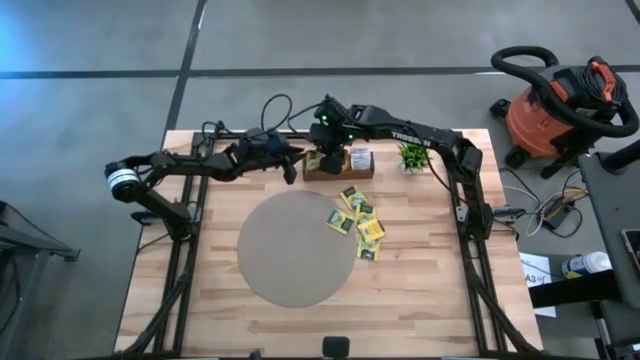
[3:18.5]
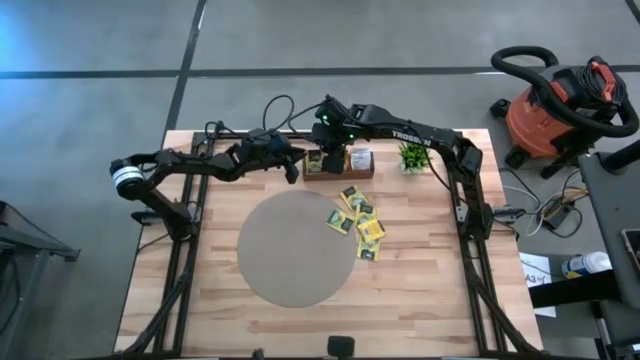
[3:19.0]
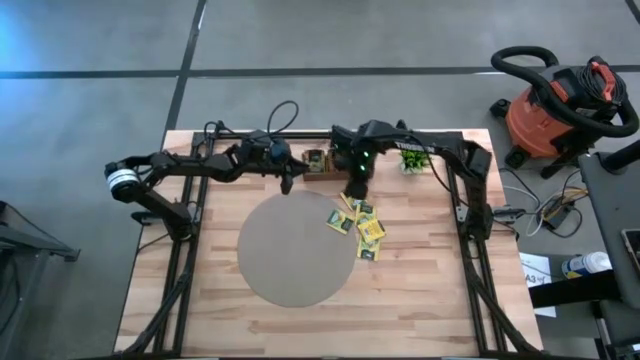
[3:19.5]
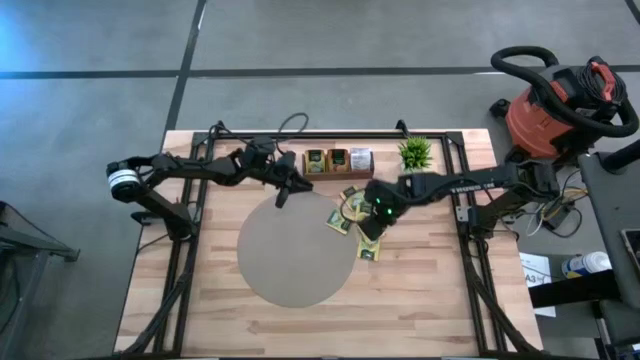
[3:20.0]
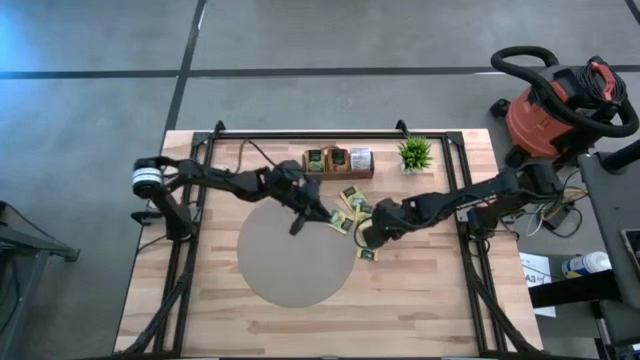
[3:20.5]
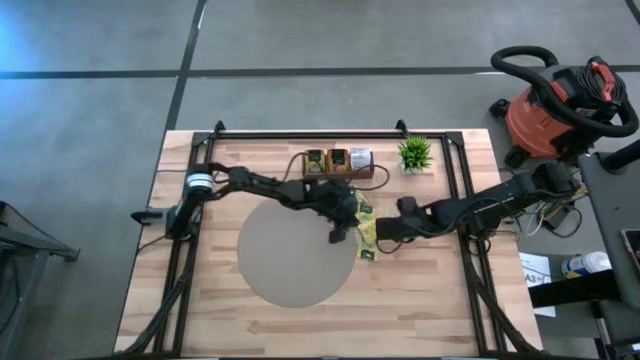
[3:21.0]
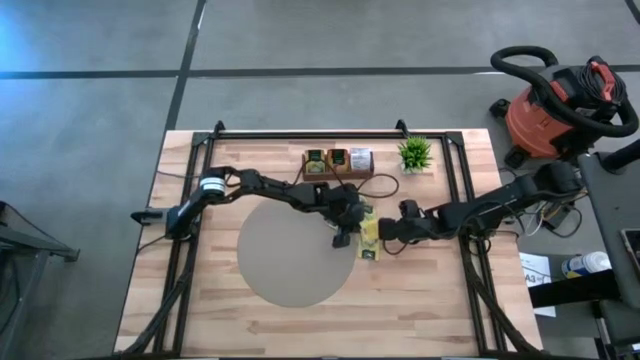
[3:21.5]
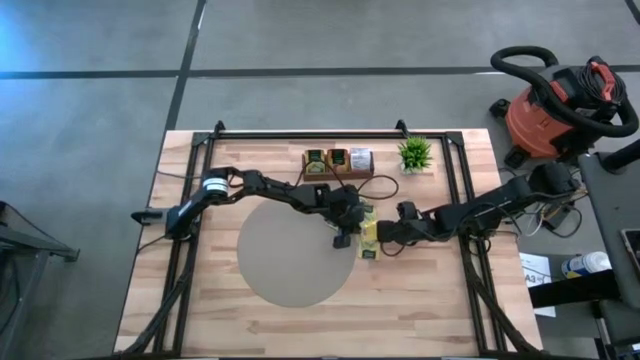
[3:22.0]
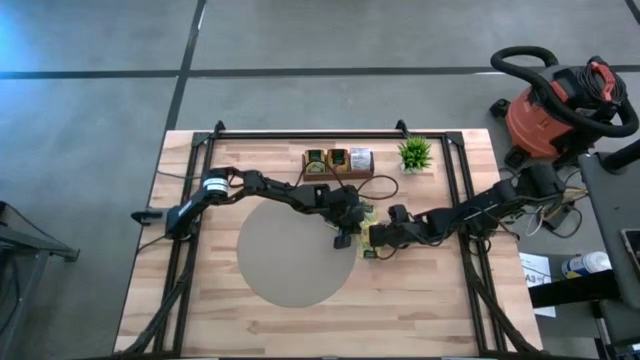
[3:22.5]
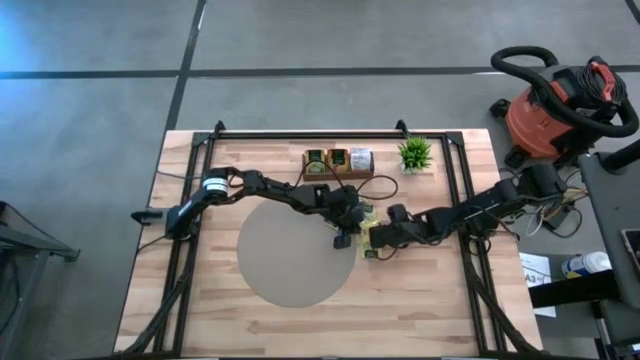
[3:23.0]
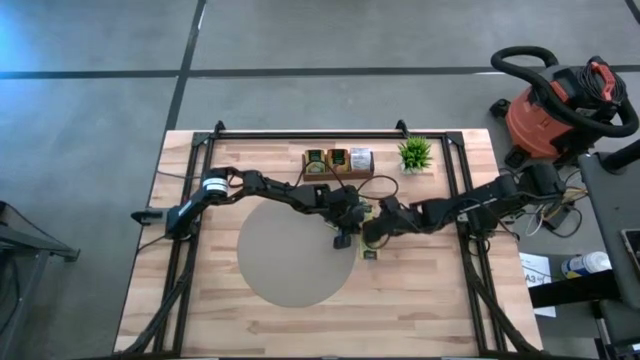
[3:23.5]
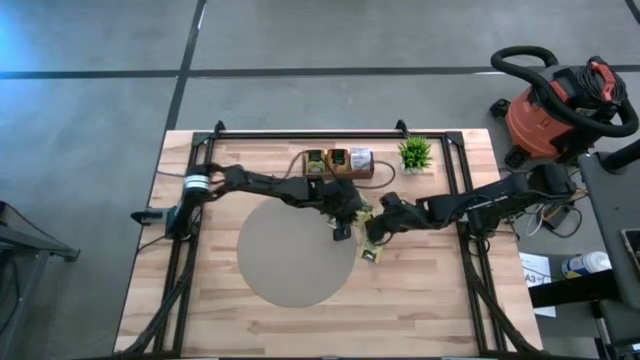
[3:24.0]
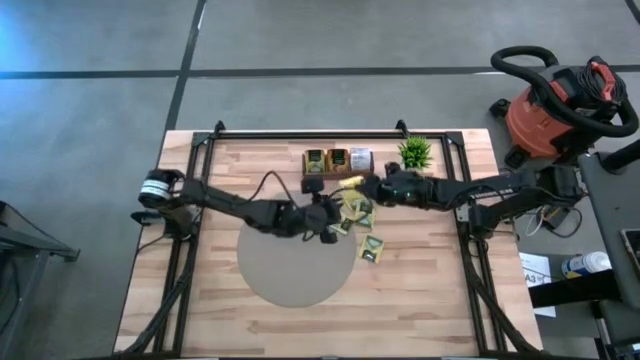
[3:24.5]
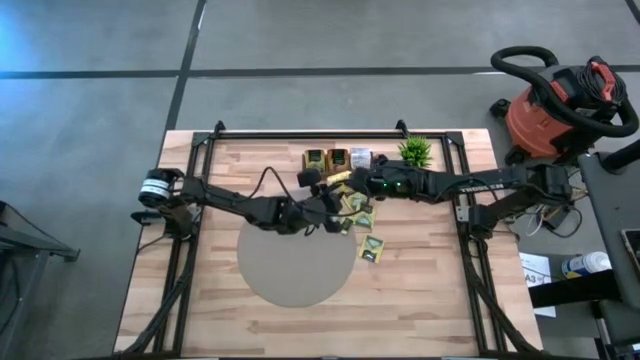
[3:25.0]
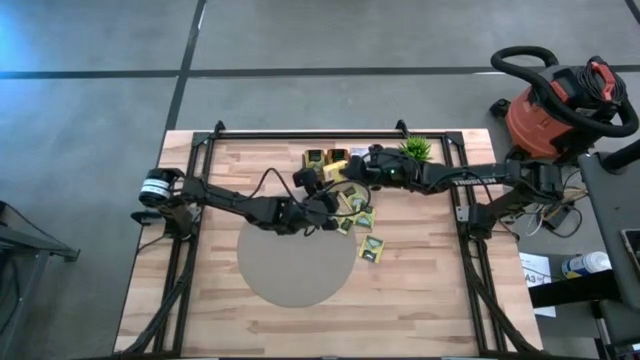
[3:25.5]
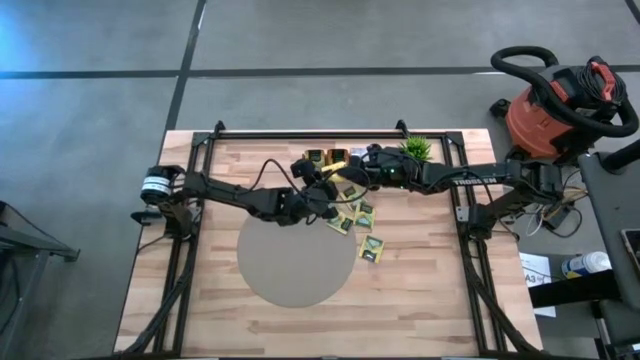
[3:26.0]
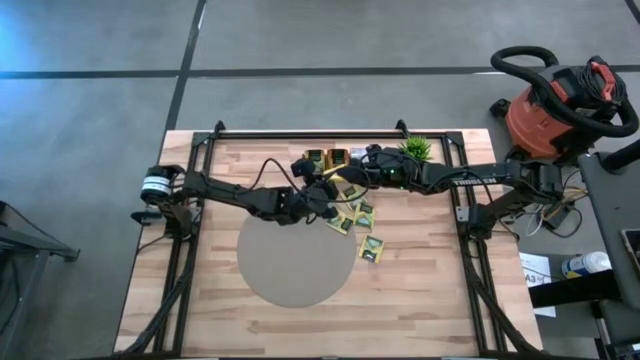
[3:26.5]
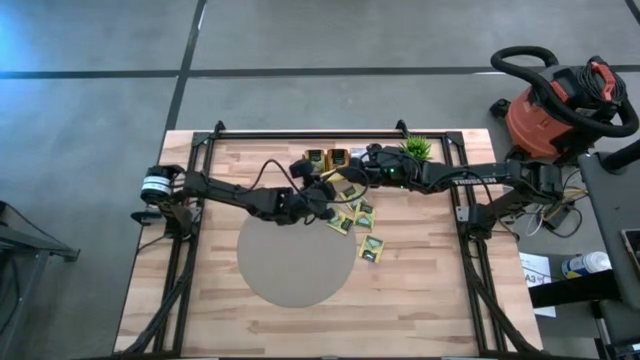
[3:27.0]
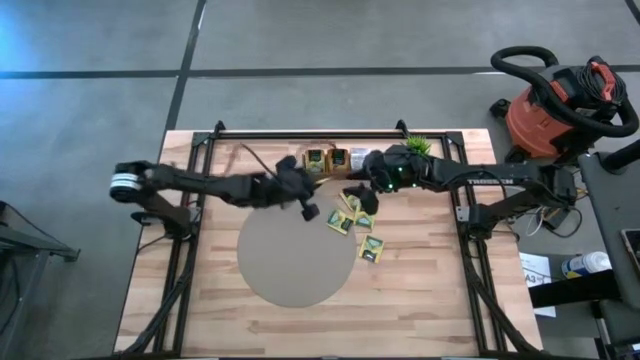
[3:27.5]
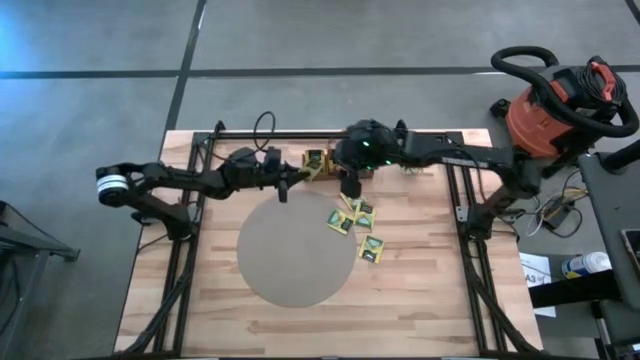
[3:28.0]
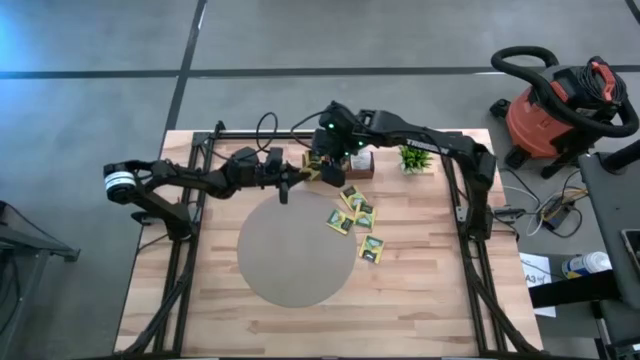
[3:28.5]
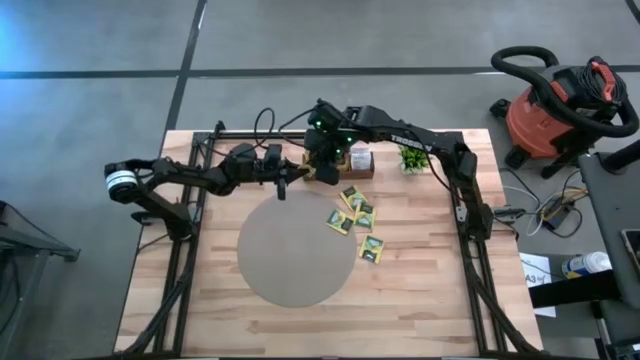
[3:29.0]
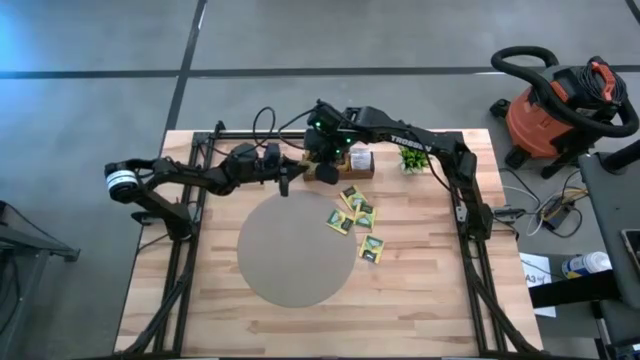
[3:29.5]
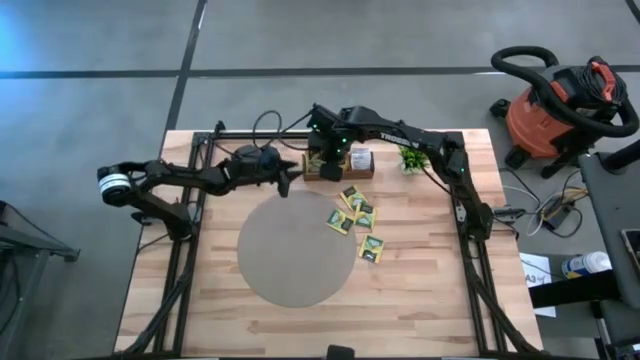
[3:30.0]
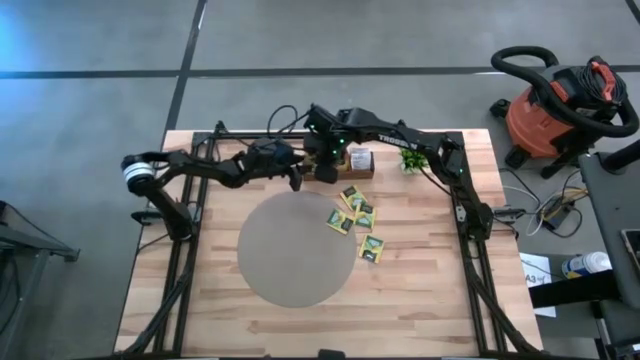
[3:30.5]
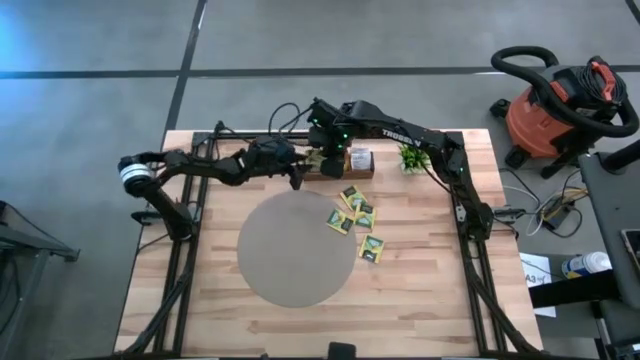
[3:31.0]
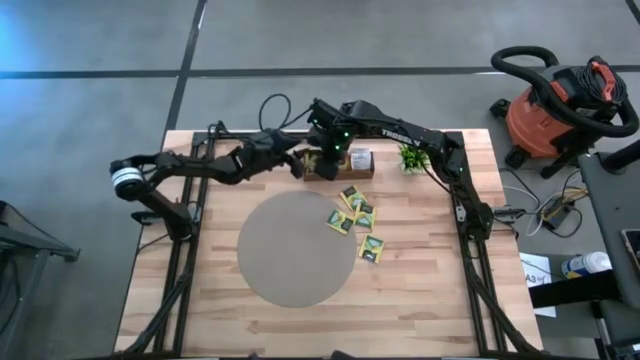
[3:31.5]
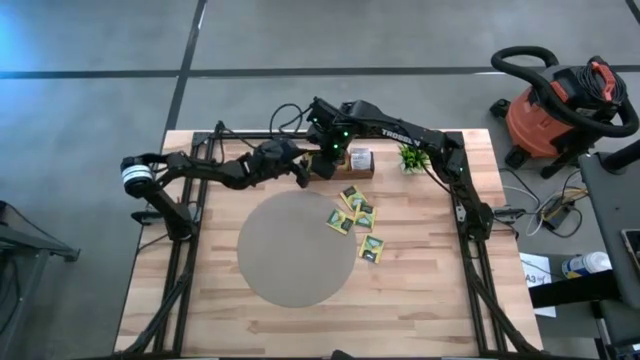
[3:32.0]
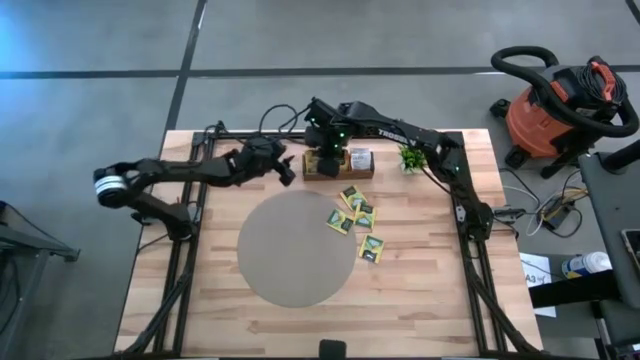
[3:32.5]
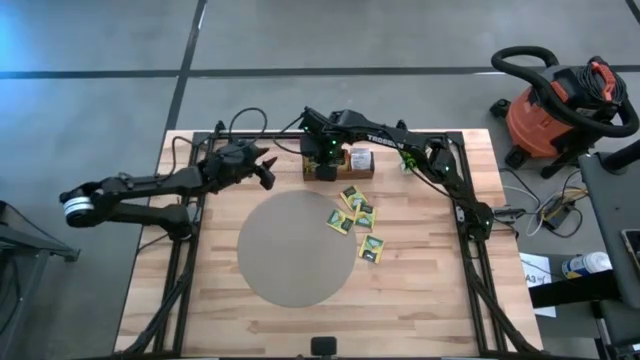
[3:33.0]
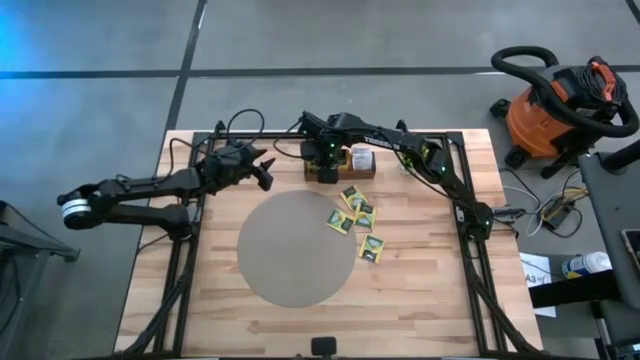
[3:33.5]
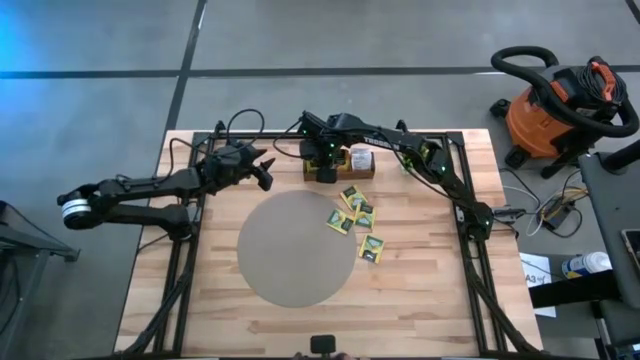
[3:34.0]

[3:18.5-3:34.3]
Task: Pick & Place Tea
Put the yellow tea sachet into the left compartment of the wooden organizer

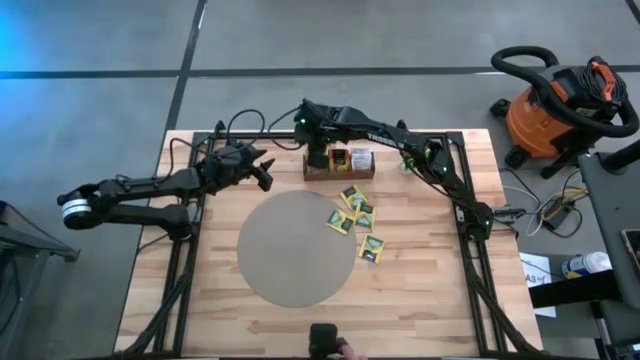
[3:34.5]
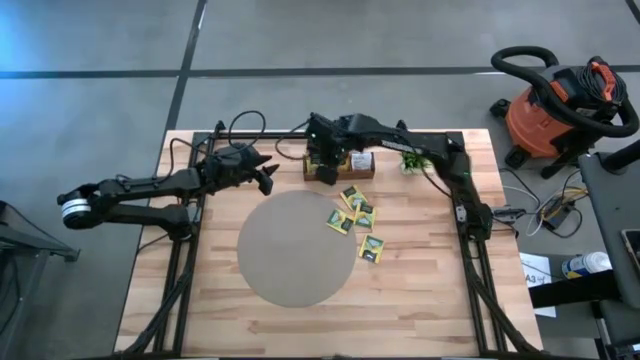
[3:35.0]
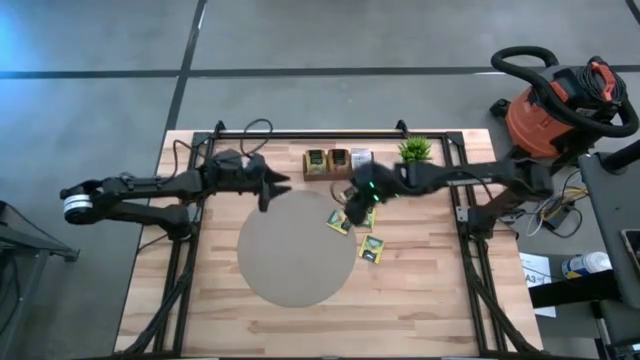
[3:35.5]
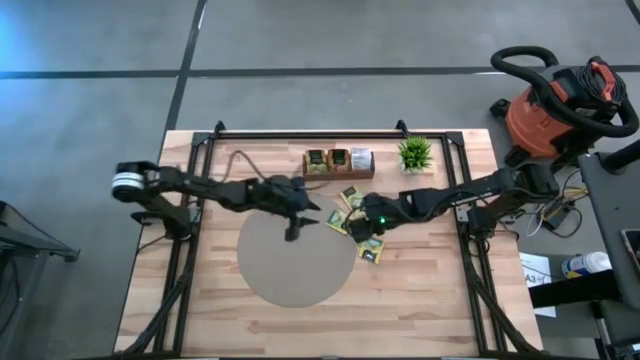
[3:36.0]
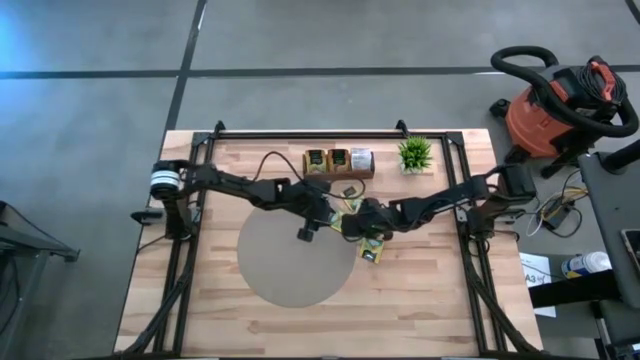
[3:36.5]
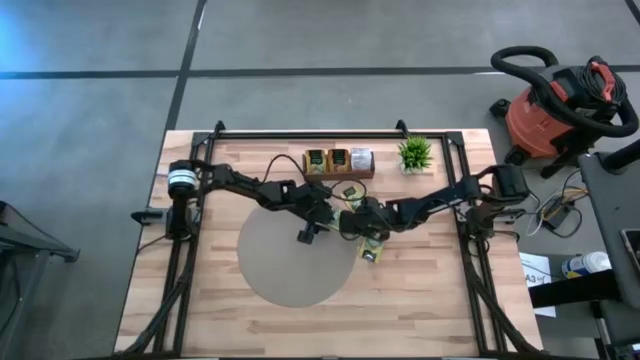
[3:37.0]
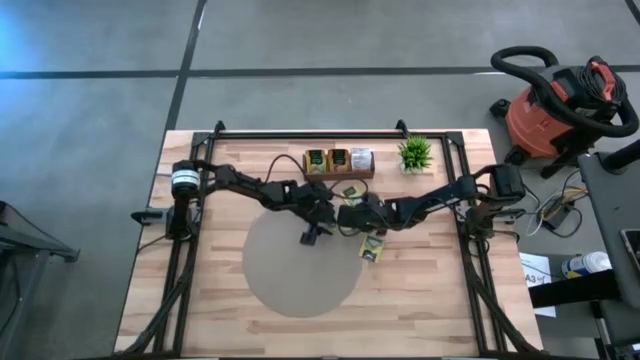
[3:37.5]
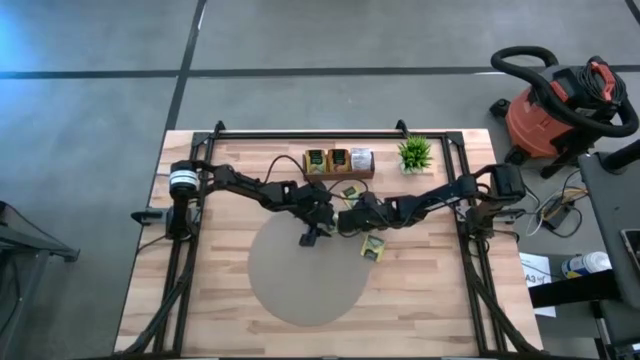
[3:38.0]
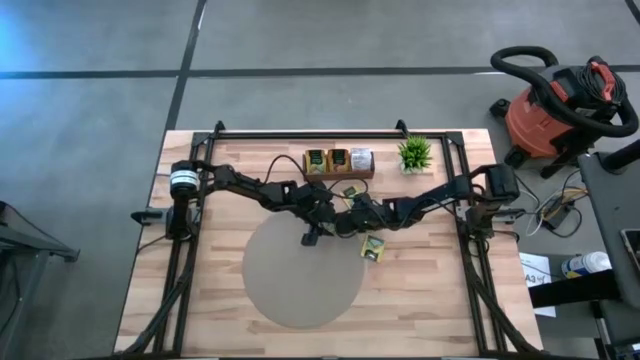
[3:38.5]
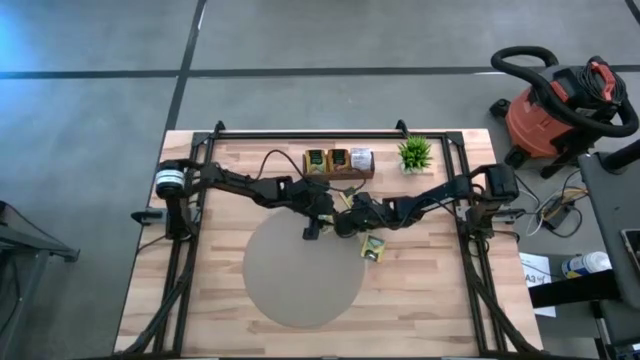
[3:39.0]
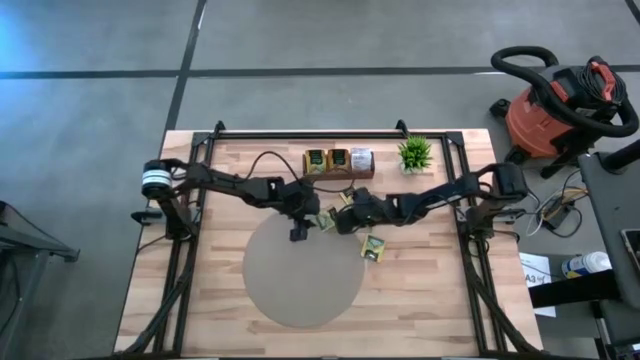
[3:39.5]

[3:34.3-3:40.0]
Put the yellow tea sachet into the left compartment of the wooden organizer
